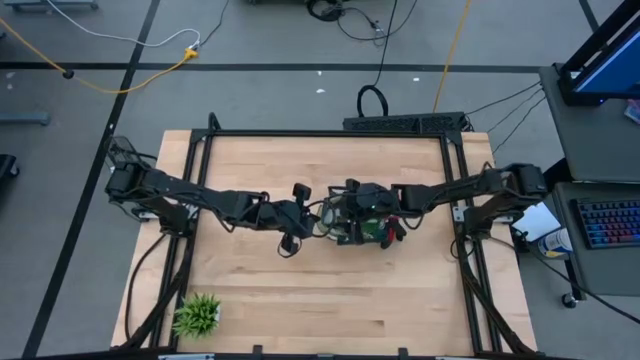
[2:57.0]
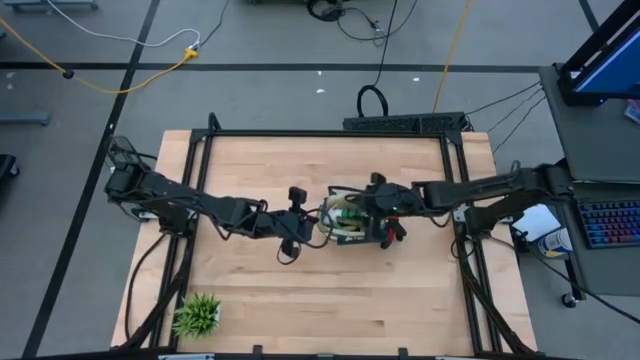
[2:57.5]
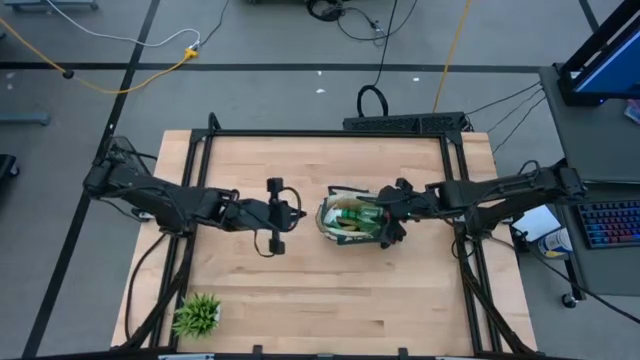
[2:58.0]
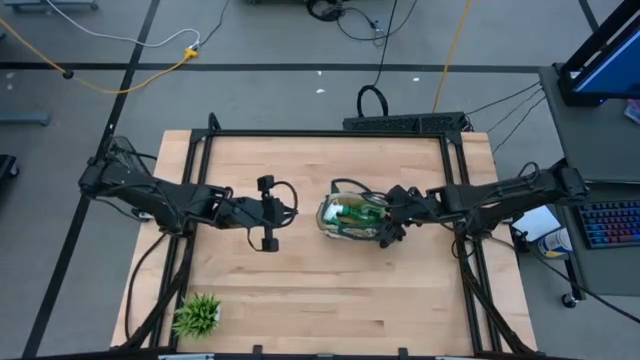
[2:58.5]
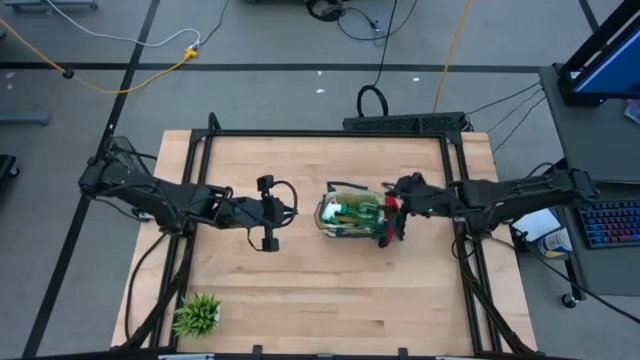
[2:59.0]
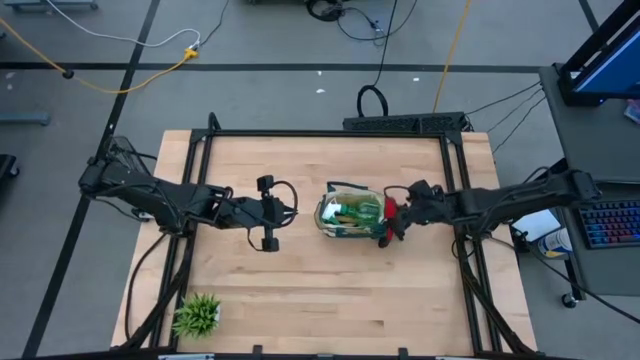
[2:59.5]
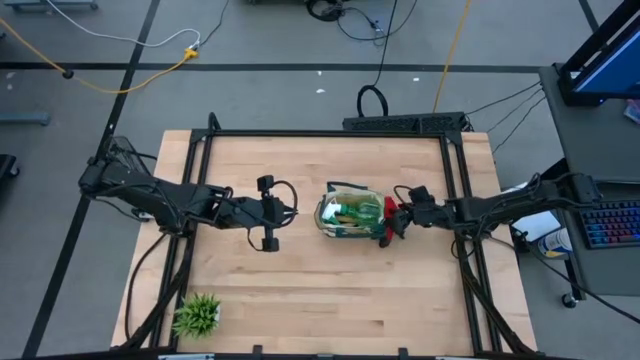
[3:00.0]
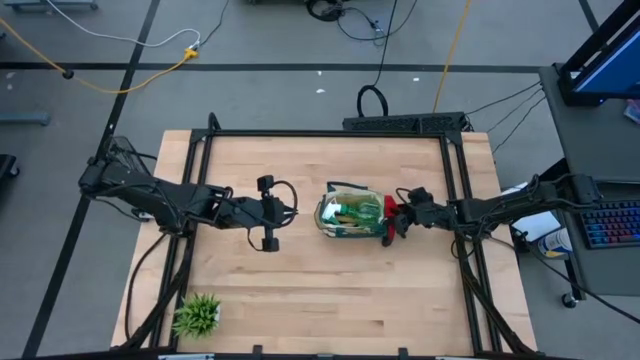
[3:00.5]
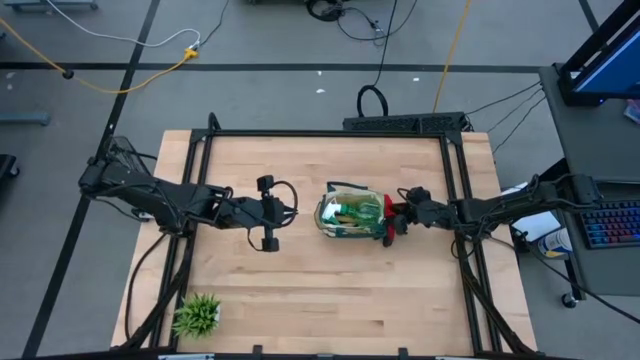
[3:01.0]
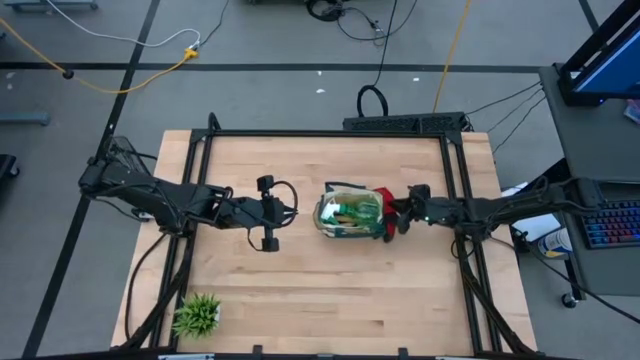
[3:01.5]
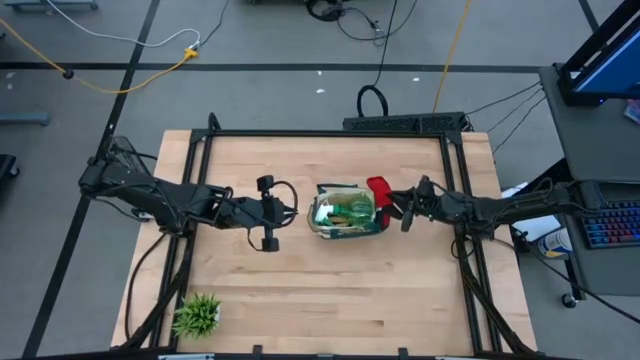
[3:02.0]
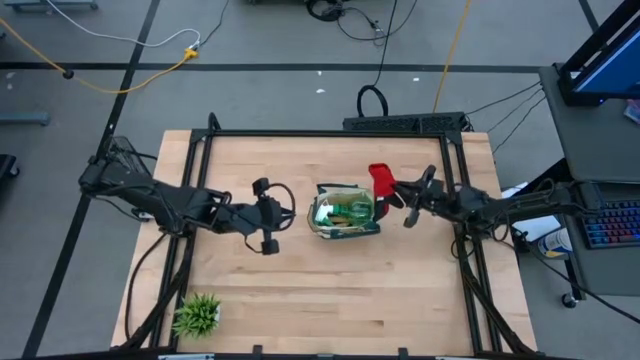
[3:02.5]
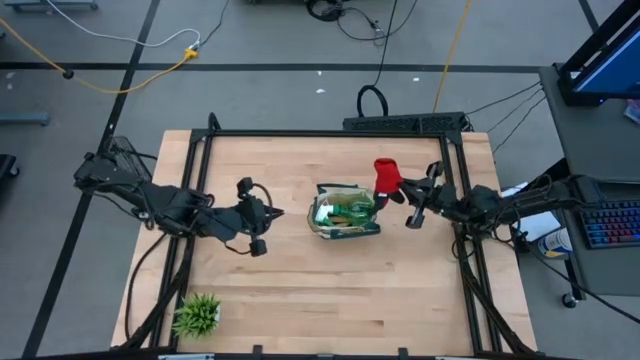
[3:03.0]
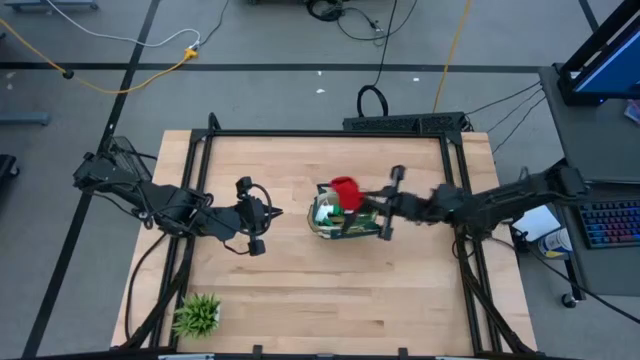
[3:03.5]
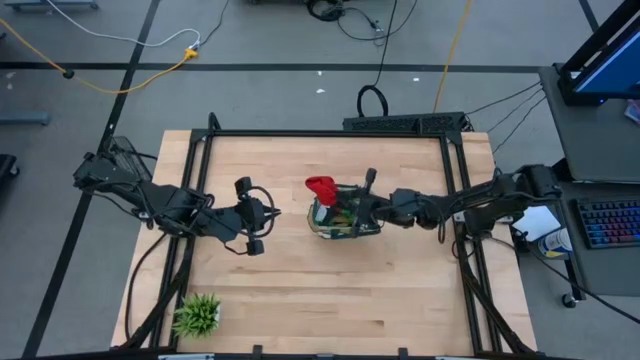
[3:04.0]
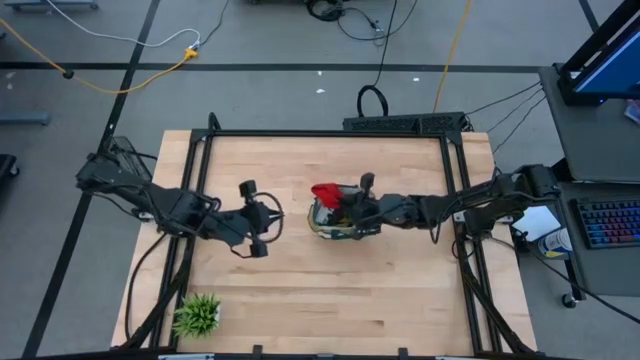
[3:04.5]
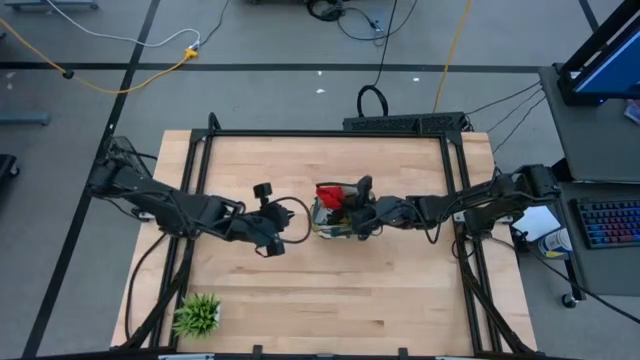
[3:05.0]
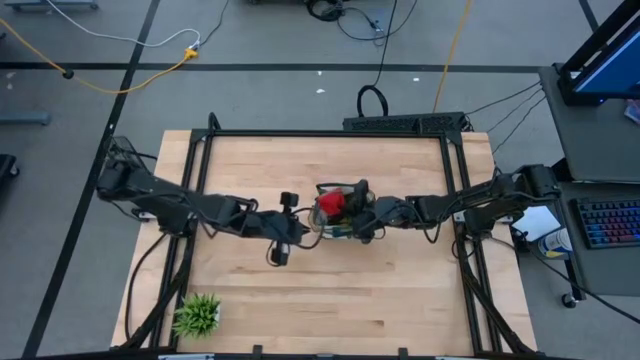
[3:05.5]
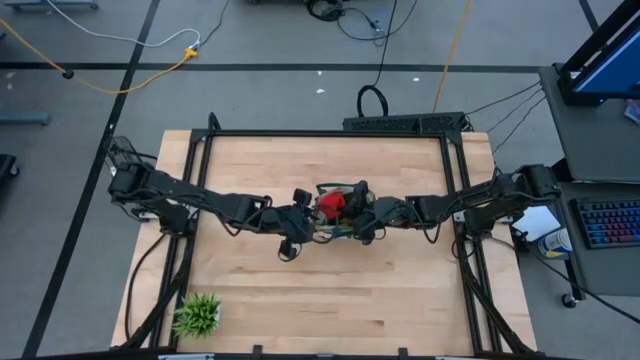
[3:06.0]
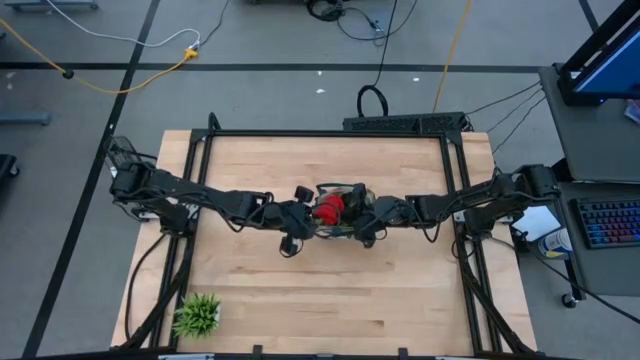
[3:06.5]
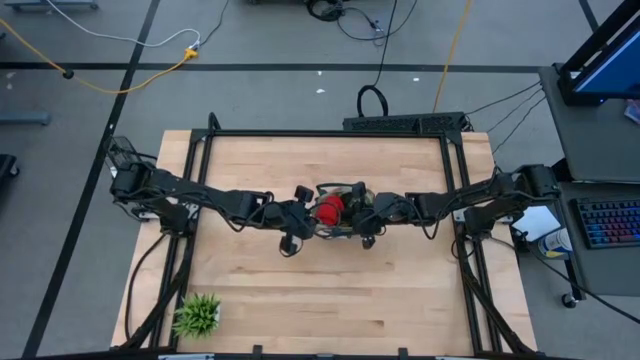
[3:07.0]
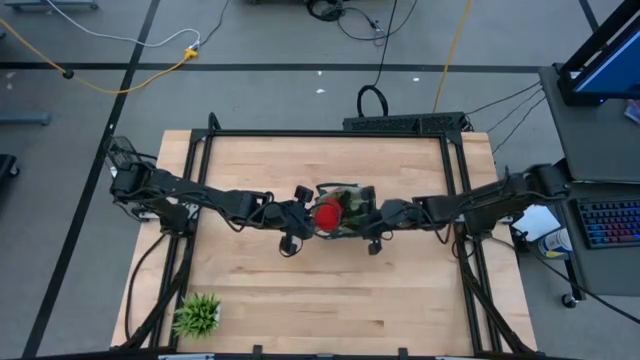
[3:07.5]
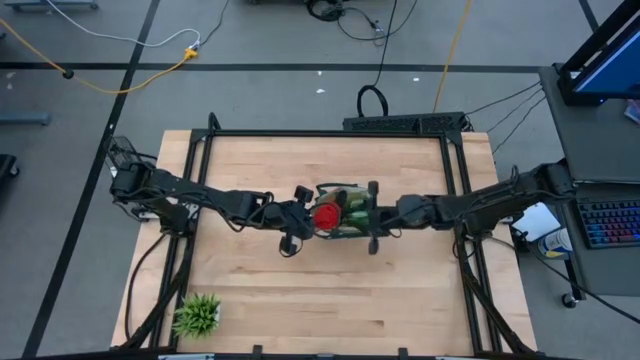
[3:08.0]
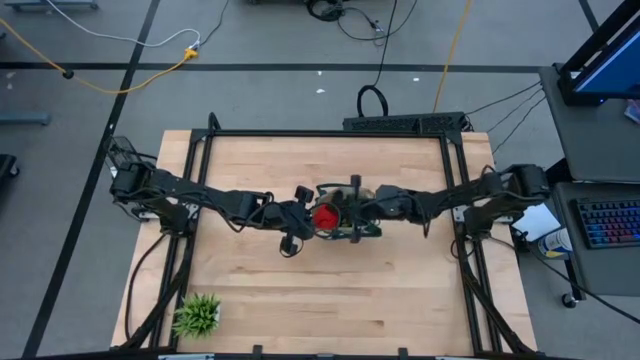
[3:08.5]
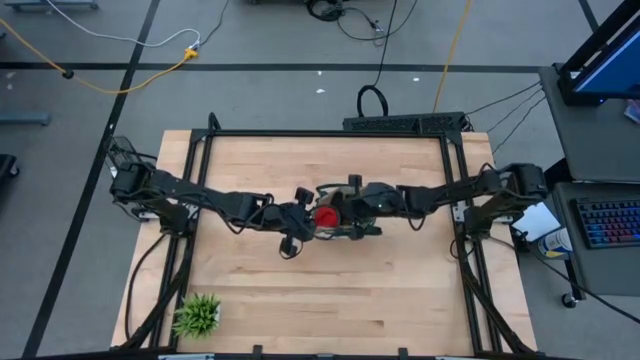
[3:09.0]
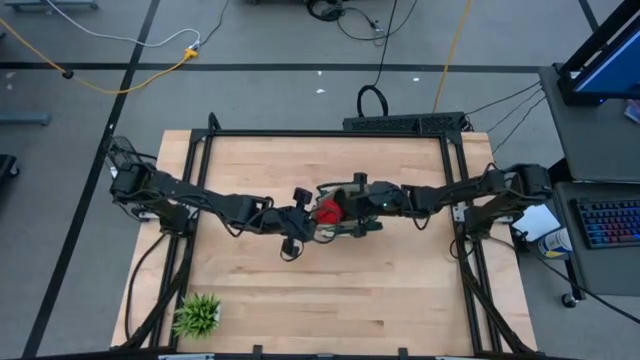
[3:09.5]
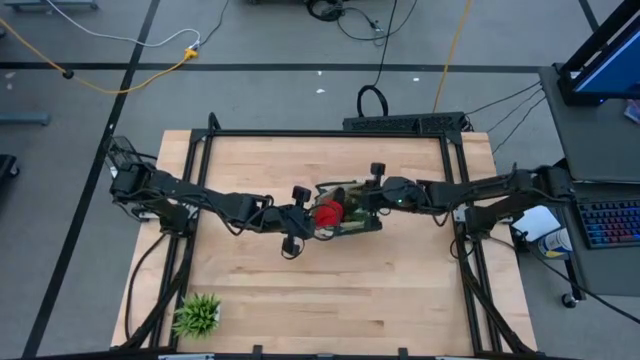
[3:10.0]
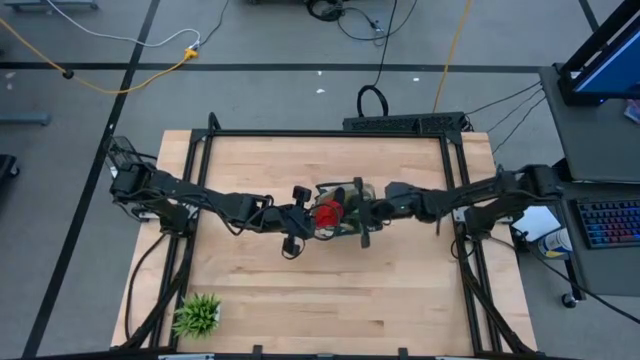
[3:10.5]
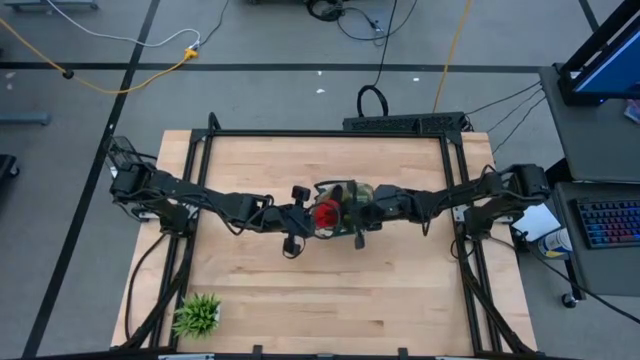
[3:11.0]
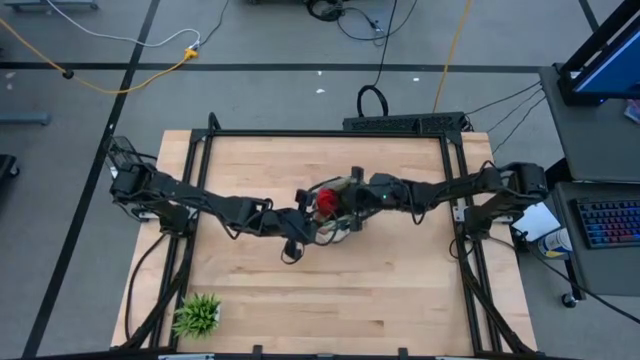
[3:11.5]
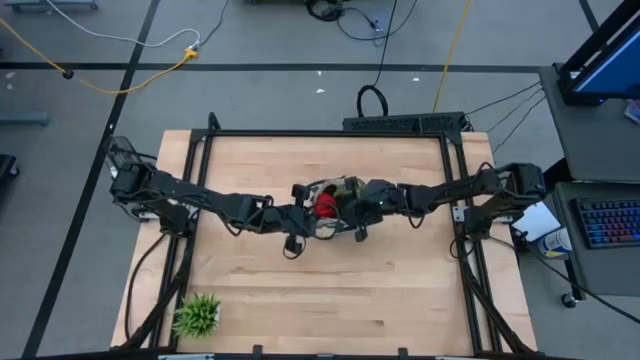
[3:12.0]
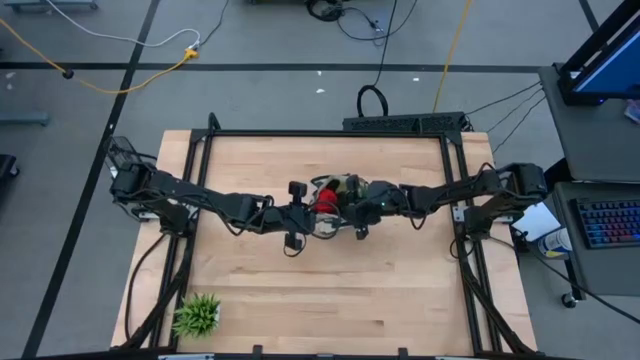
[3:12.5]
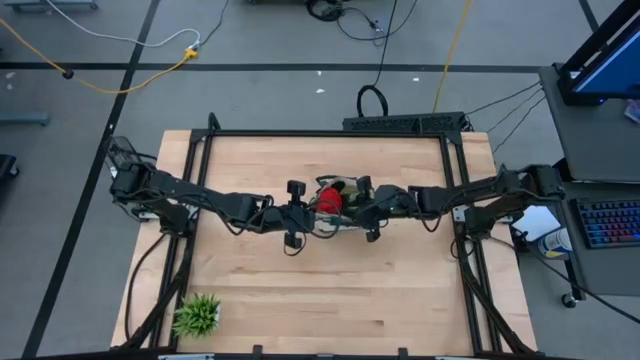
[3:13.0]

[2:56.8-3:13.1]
Task: Pick & Place Garden tools in Gardening bag
Put the red gloves into the green gardening bag

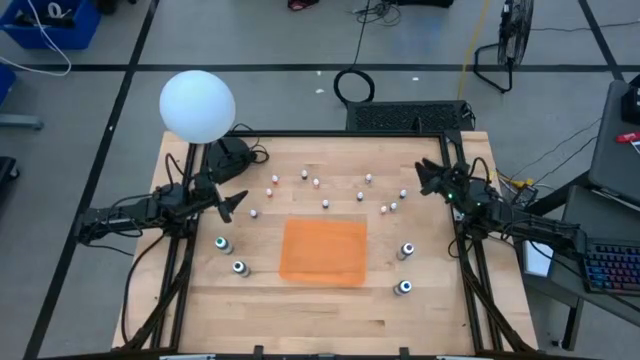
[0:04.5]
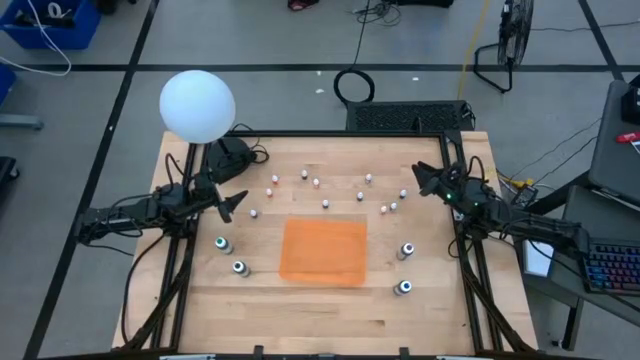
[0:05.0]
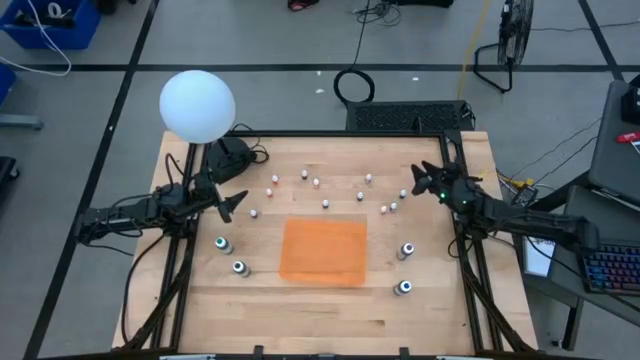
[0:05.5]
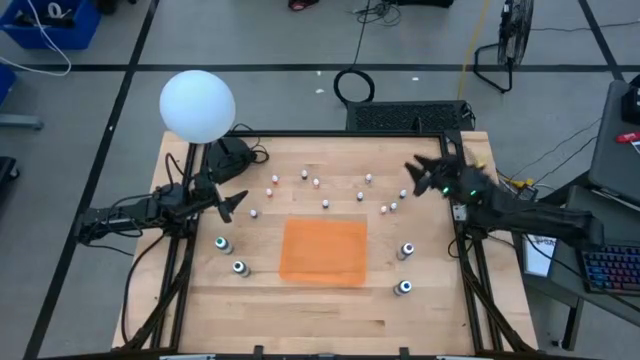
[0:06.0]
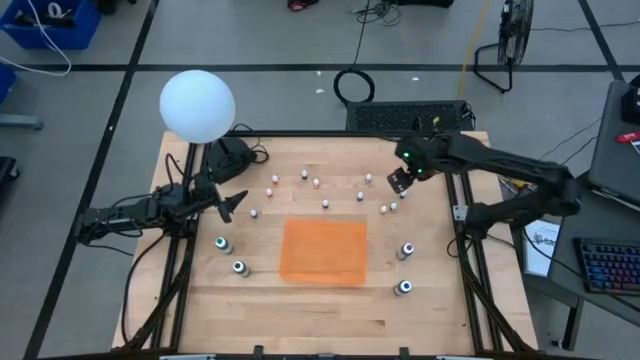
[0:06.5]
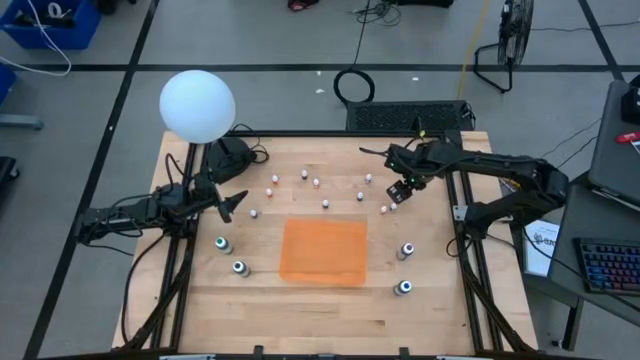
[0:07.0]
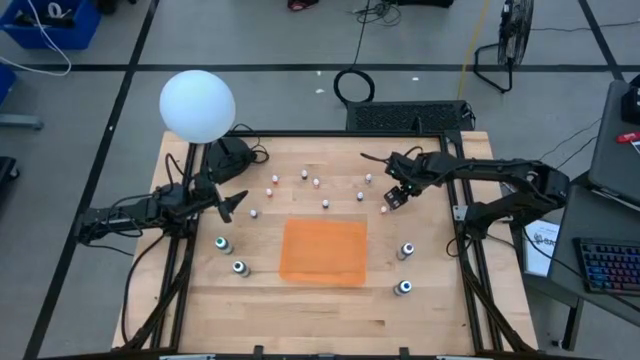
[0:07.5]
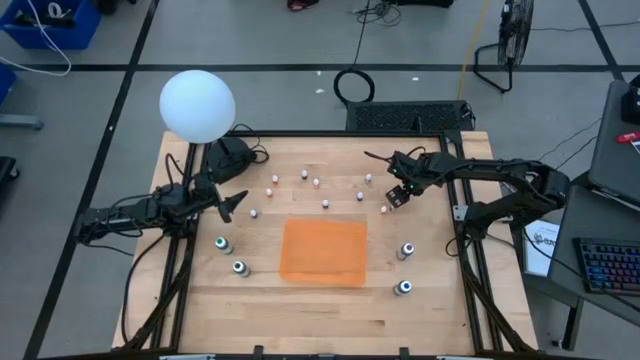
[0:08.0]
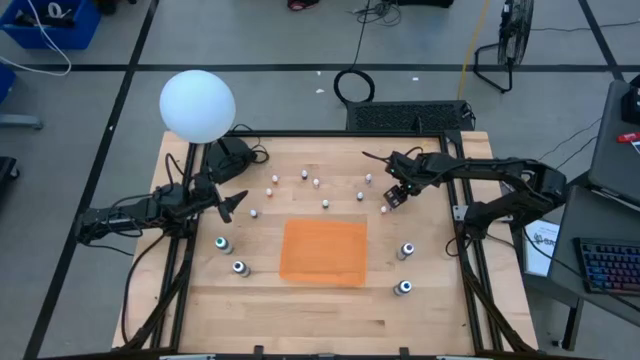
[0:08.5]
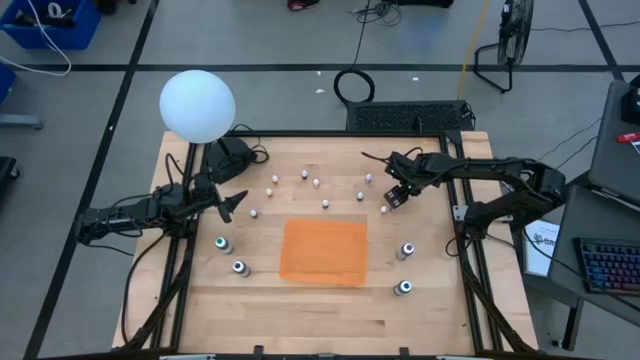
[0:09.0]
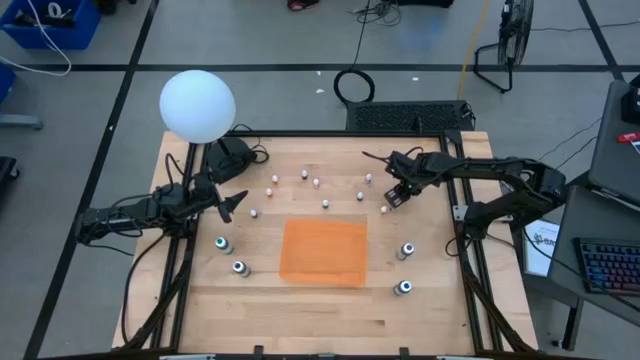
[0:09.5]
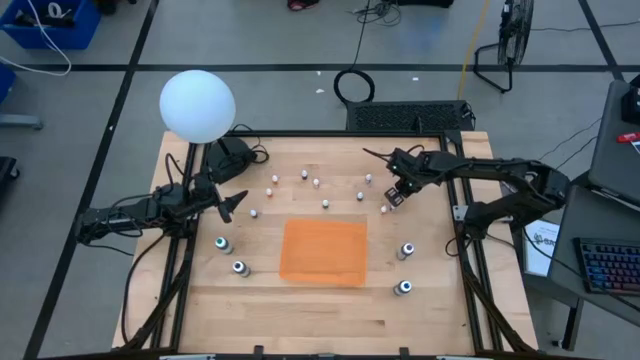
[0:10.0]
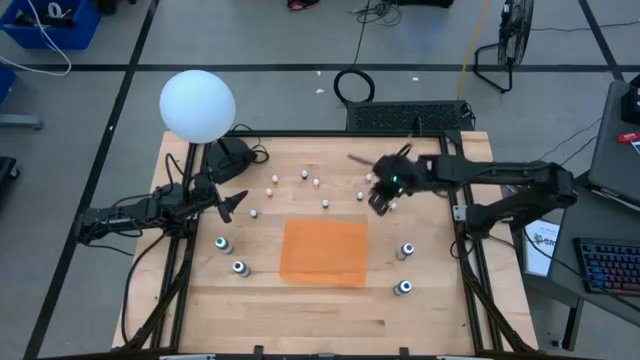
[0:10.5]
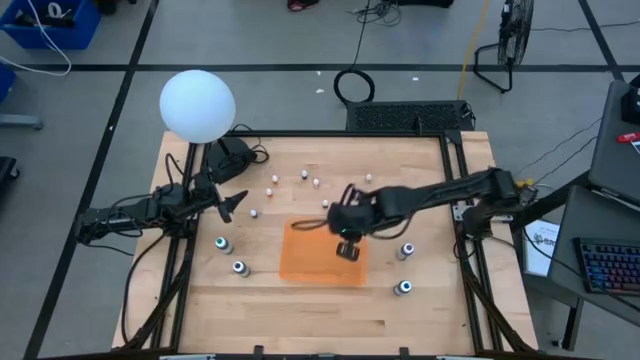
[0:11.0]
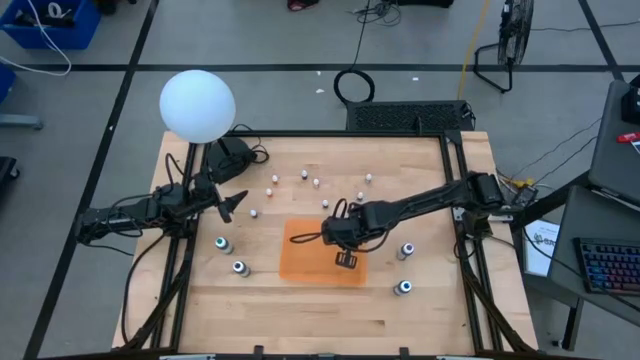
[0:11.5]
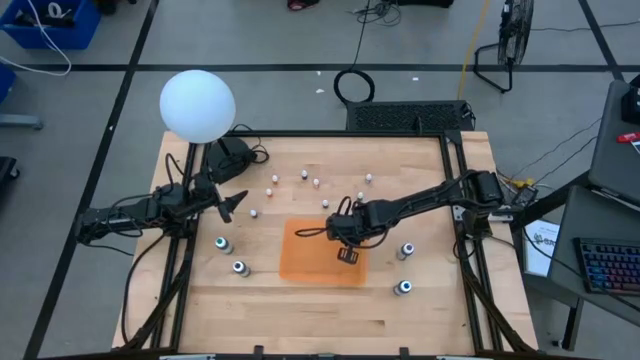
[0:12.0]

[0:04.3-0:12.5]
Task: Pick & Place food coloring
Put the right red food coloring bottle into the orange bin
